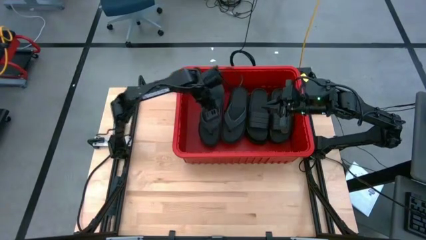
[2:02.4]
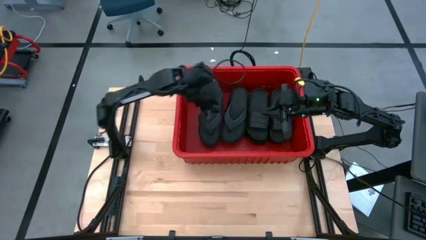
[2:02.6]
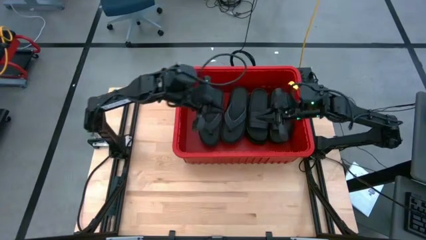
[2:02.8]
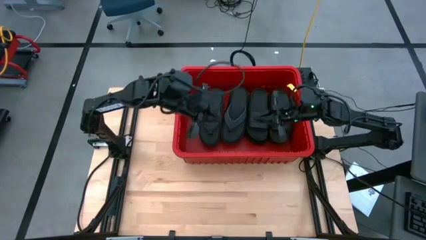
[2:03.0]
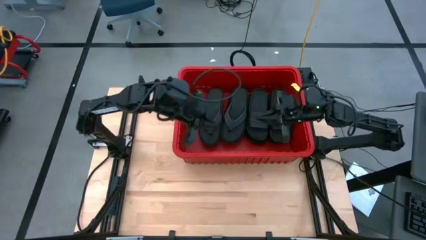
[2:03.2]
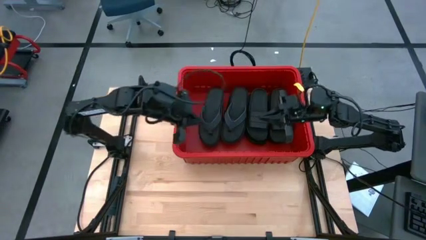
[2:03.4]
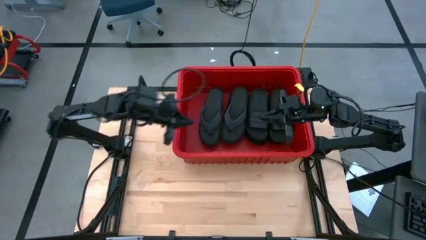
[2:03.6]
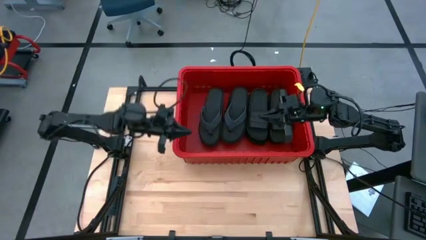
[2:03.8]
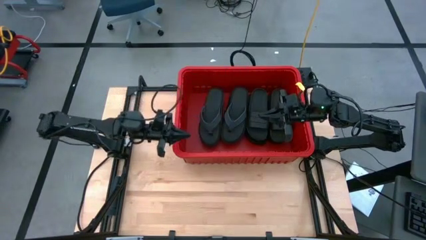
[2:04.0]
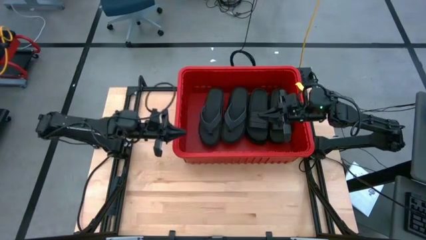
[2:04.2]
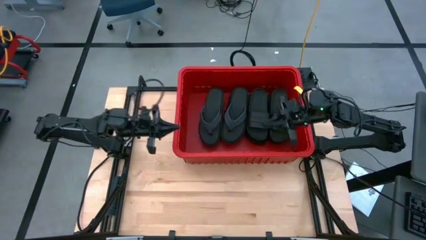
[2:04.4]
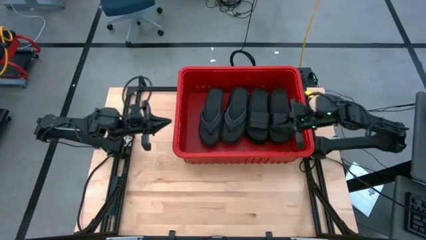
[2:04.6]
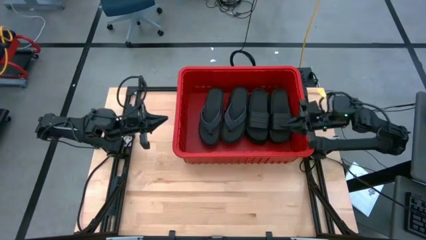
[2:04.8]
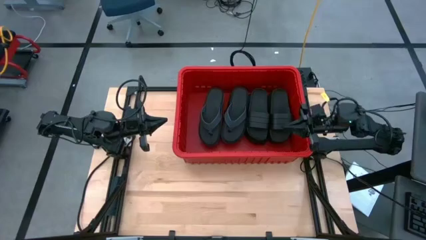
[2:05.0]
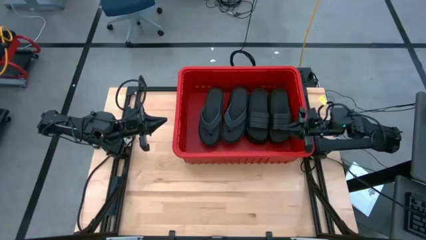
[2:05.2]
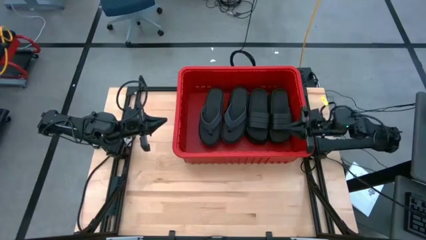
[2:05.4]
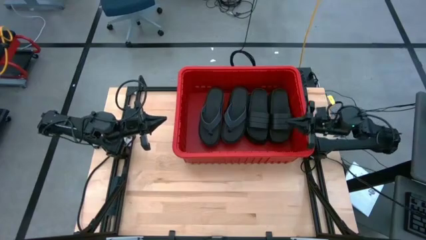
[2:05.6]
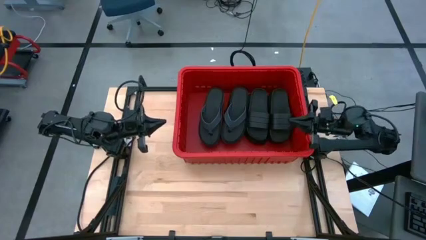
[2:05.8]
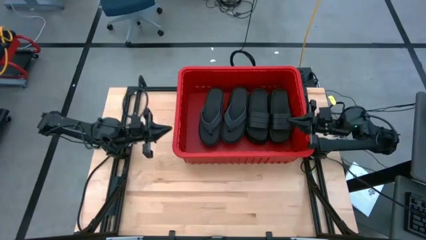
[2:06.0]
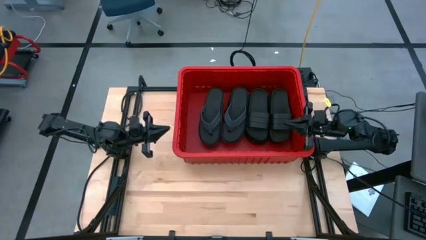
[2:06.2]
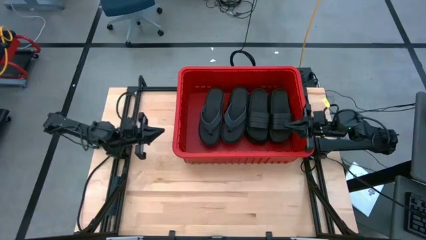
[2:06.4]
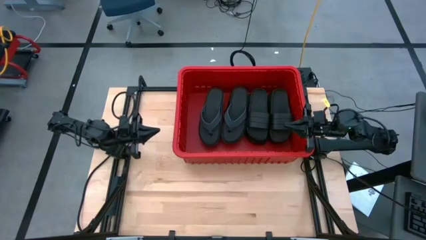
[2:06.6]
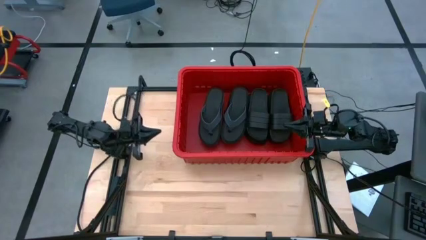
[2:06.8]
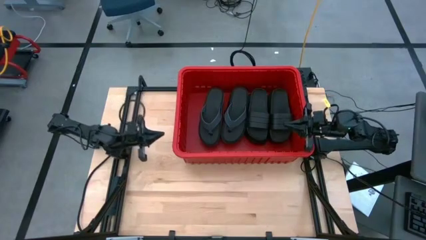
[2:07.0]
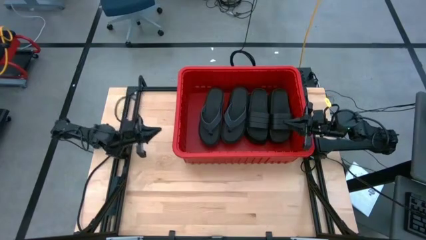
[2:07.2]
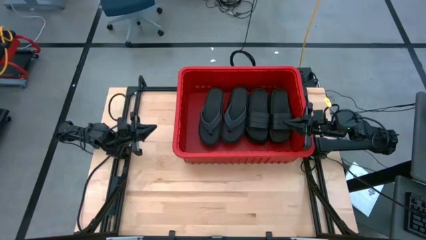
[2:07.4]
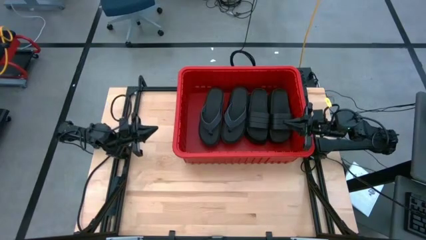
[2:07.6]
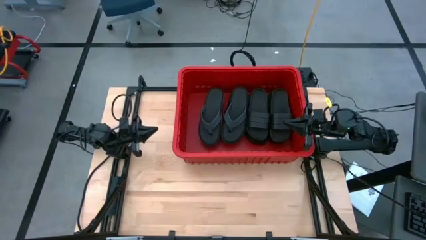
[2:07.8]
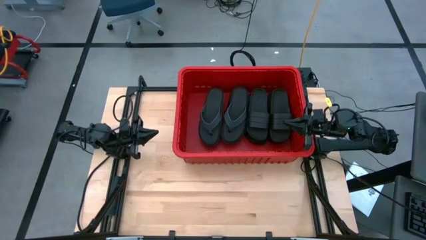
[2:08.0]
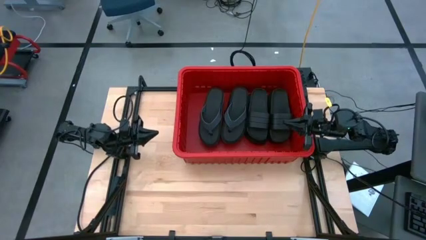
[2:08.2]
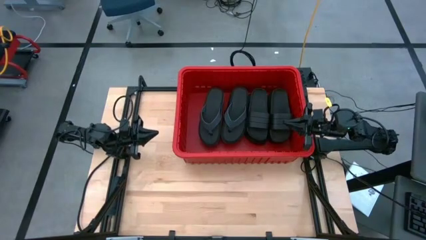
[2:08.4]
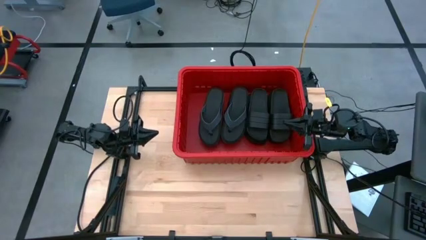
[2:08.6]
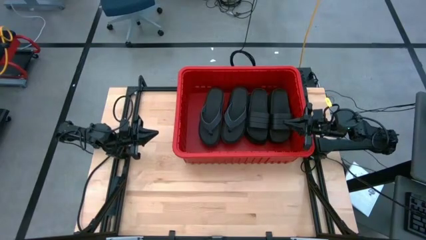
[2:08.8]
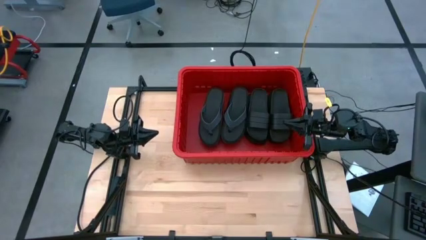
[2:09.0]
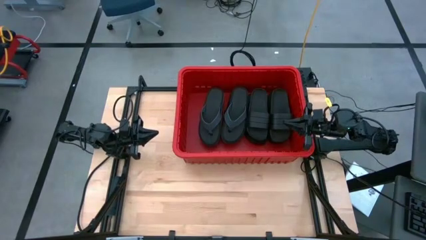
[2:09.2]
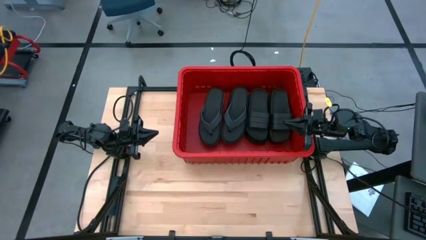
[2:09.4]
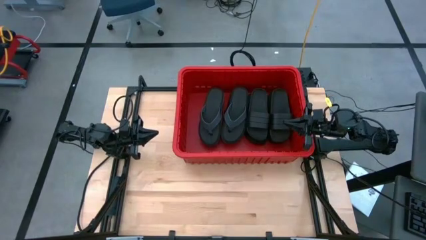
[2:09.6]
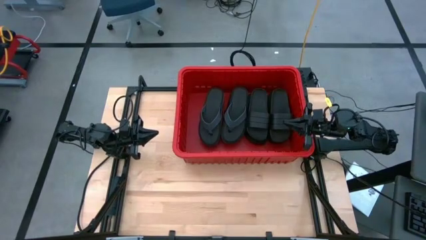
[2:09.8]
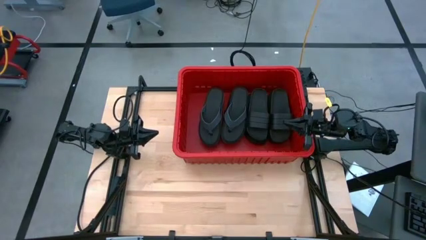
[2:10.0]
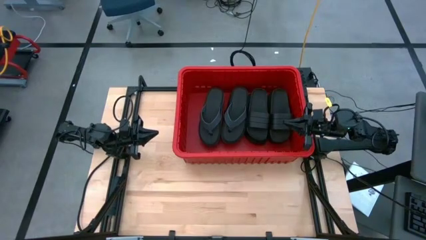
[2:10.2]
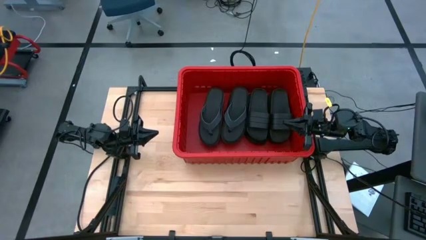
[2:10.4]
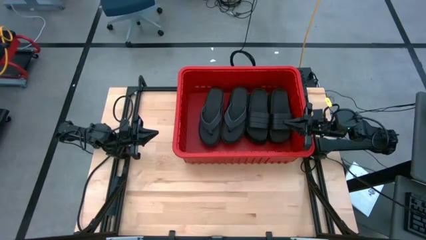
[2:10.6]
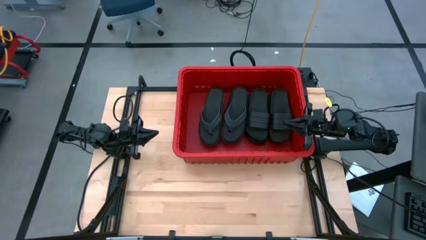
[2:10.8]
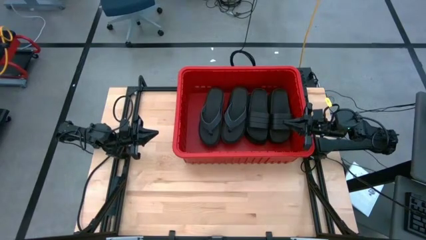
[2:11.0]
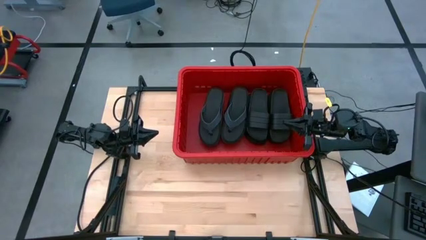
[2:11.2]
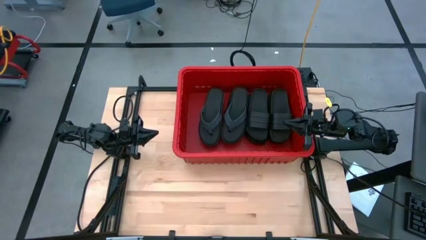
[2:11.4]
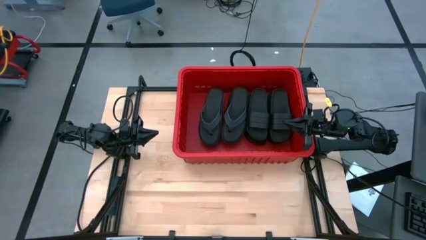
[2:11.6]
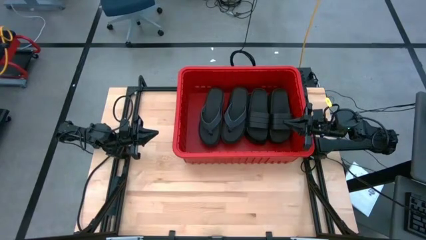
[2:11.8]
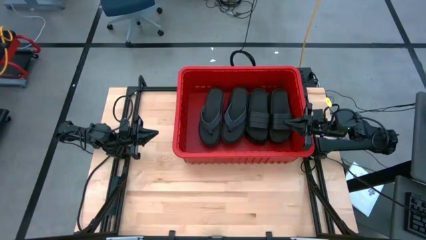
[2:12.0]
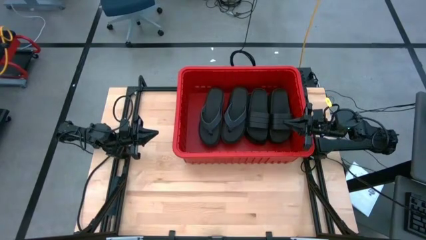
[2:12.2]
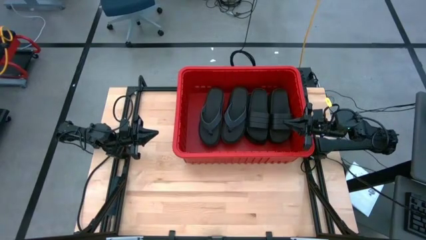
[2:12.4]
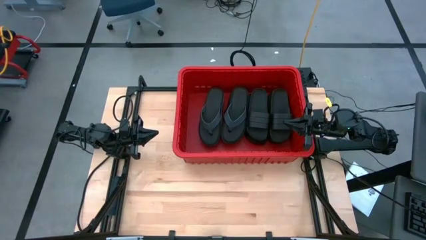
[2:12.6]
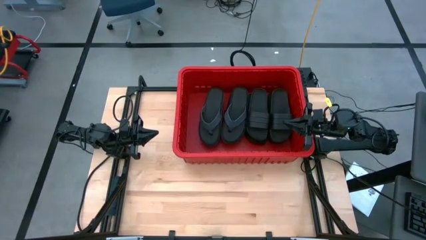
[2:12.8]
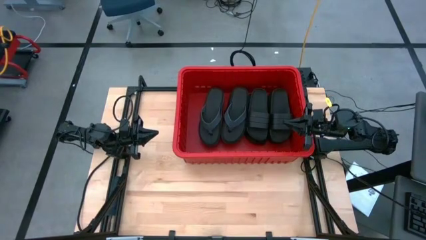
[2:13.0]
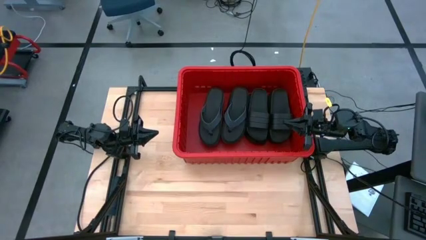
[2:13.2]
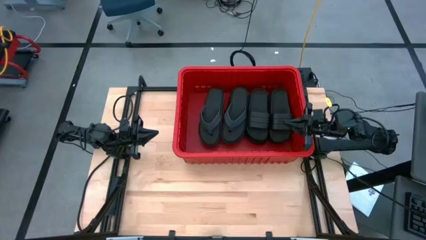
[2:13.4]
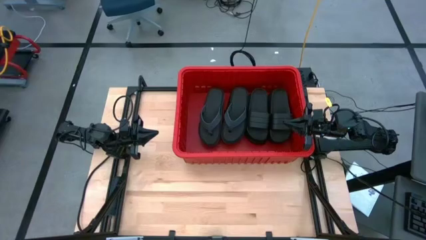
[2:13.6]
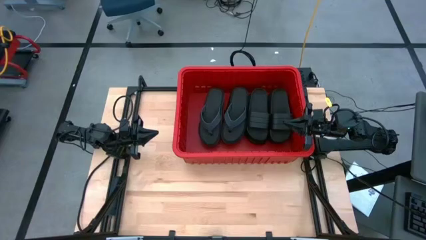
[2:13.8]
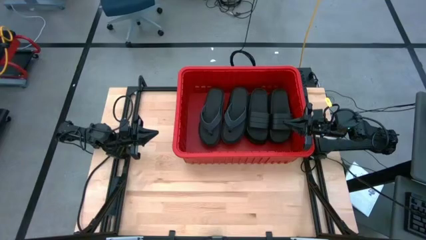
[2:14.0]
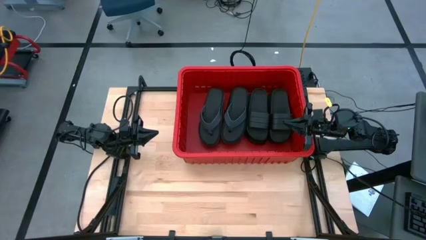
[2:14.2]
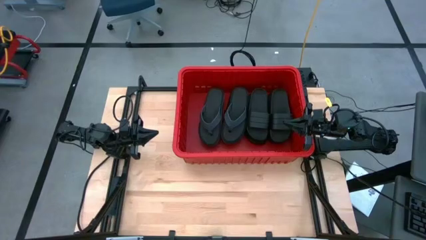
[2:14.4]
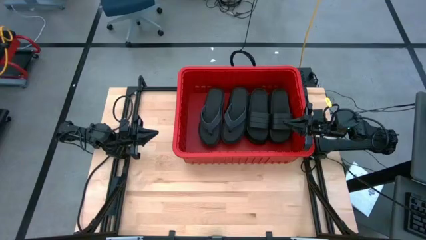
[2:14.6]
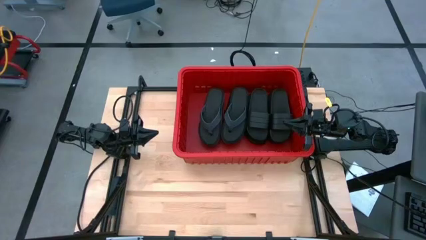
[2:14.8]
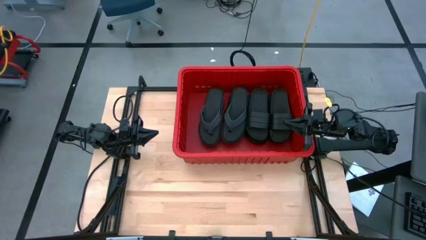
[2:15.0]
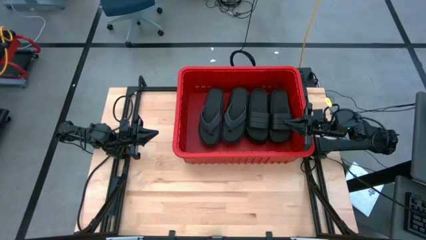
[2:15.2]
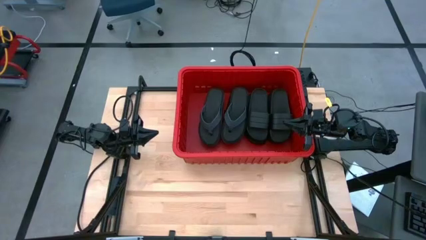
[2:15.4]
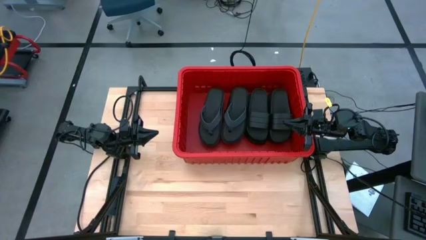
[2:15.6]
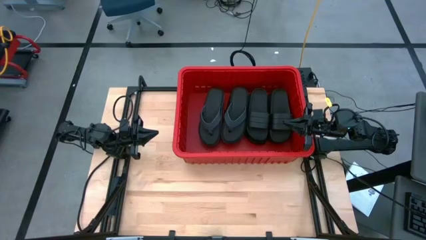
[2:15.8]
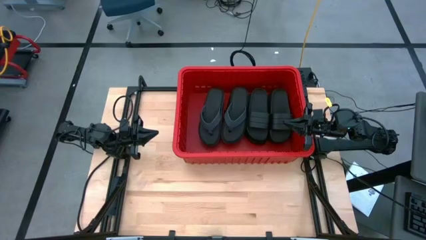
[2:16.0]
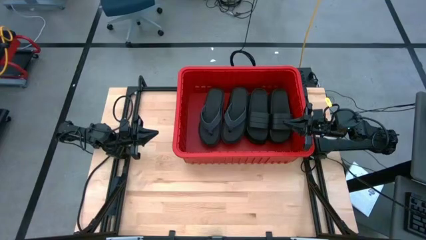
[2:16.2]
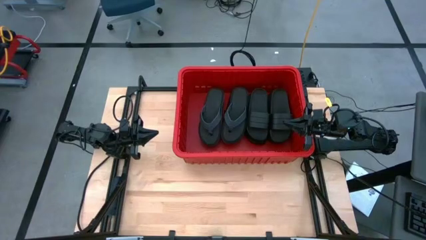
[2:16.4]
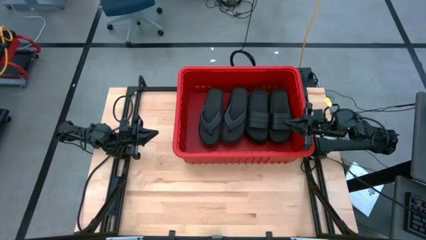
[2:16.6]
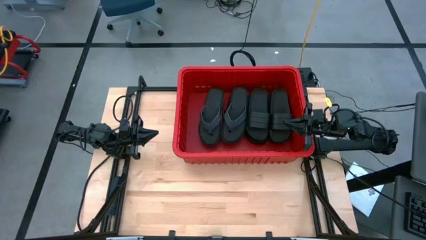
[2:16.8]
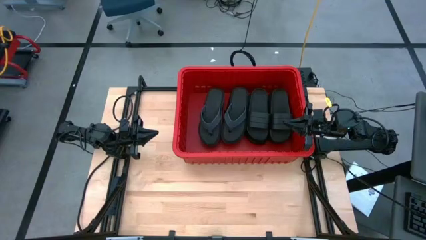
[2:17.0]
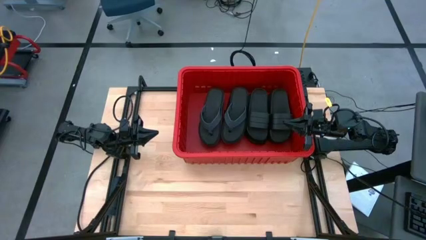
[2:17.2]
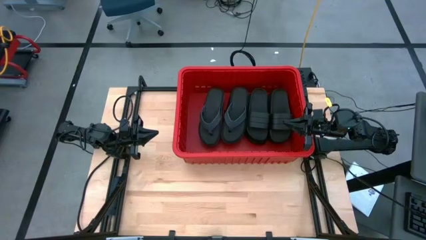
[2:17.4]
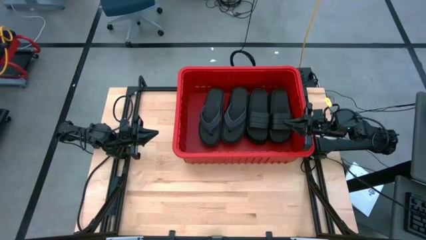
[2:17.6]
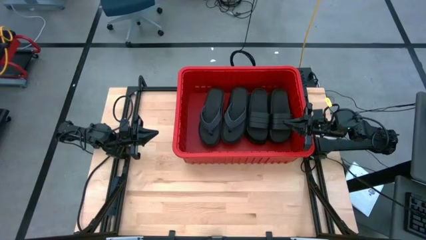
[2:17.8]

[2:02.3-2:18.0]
Task: Pick and place slides into bin
Return to Home Position
